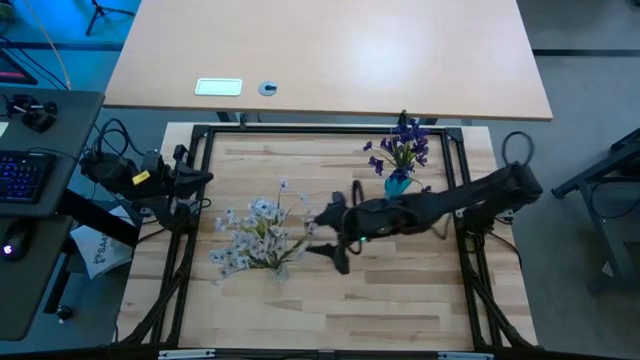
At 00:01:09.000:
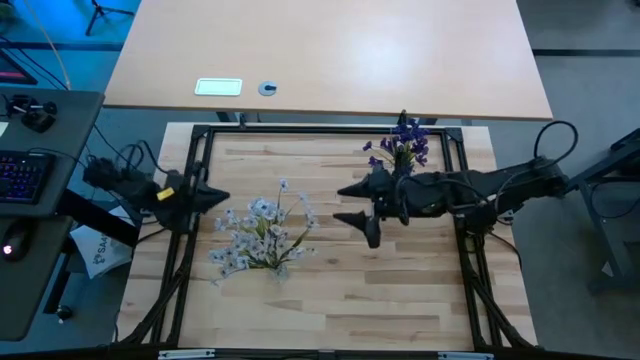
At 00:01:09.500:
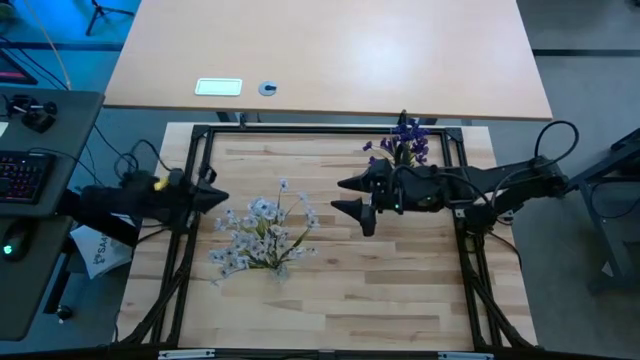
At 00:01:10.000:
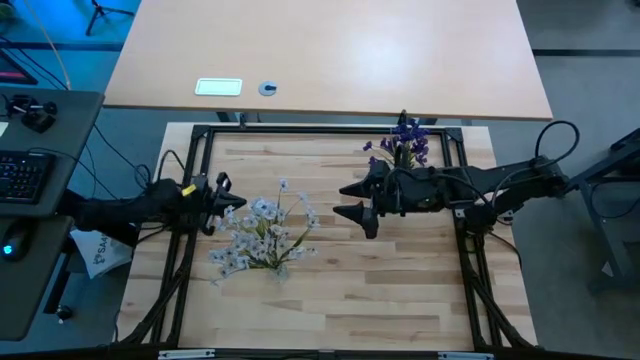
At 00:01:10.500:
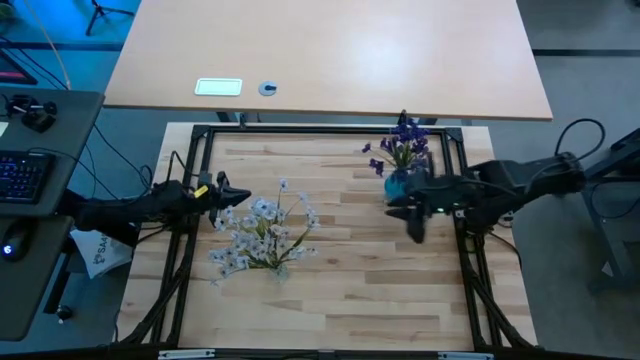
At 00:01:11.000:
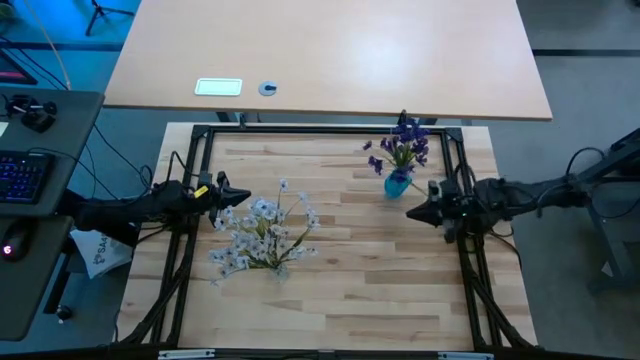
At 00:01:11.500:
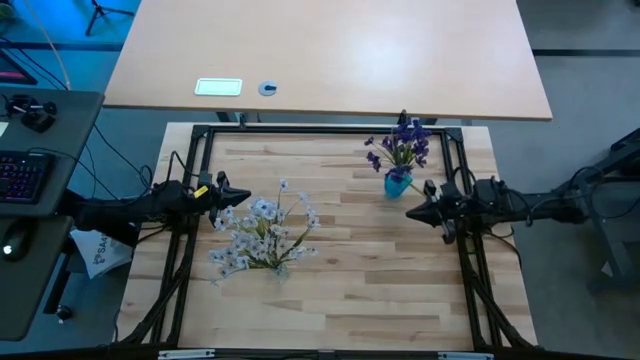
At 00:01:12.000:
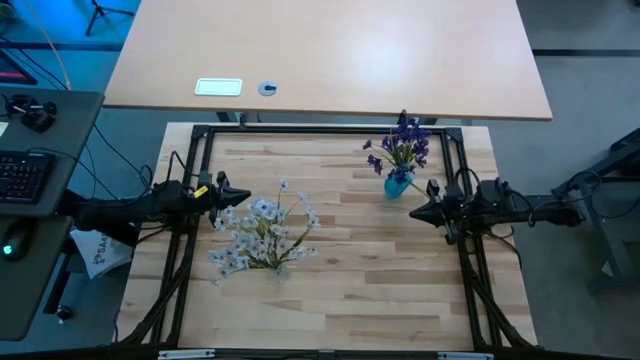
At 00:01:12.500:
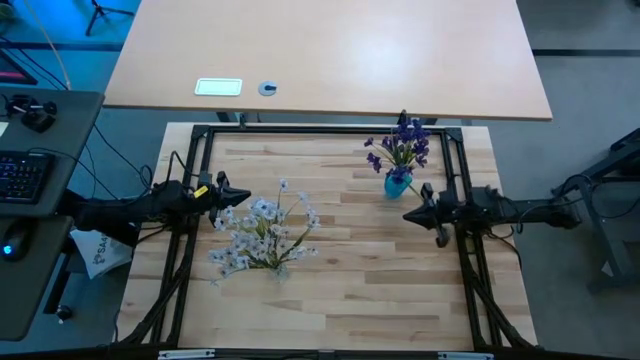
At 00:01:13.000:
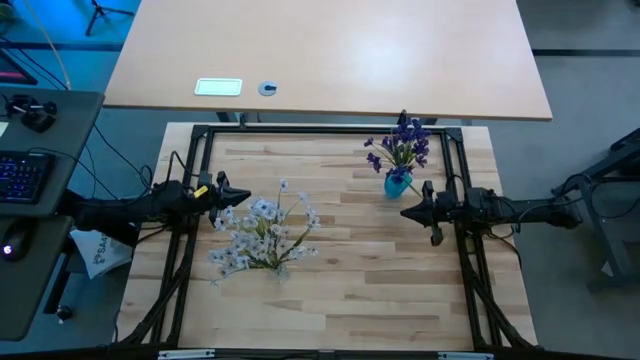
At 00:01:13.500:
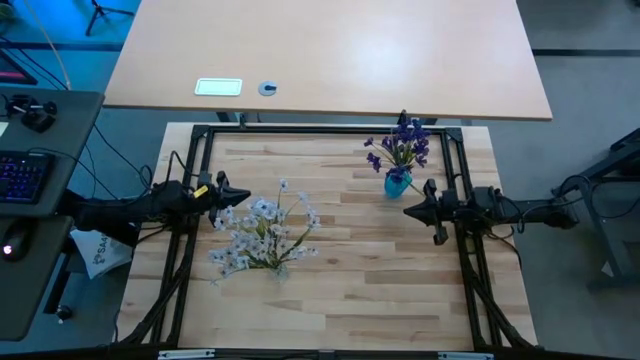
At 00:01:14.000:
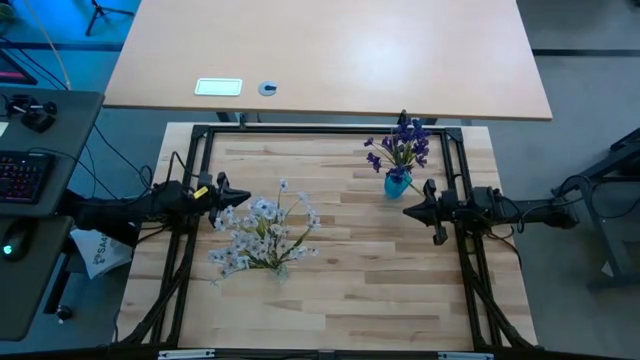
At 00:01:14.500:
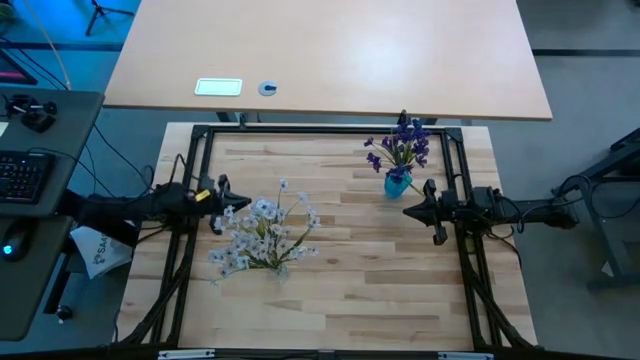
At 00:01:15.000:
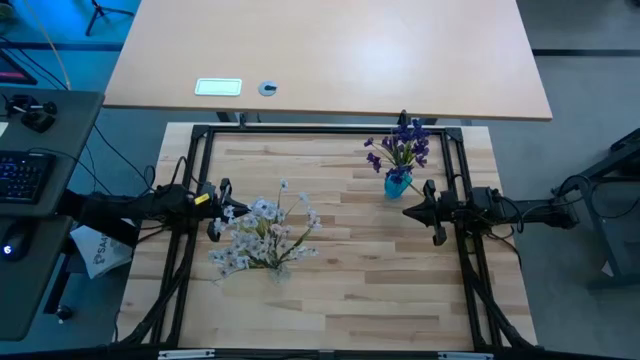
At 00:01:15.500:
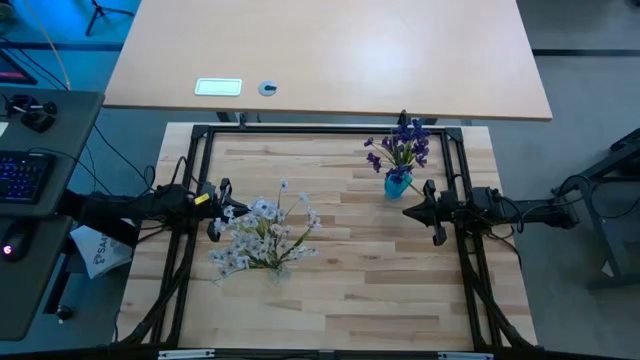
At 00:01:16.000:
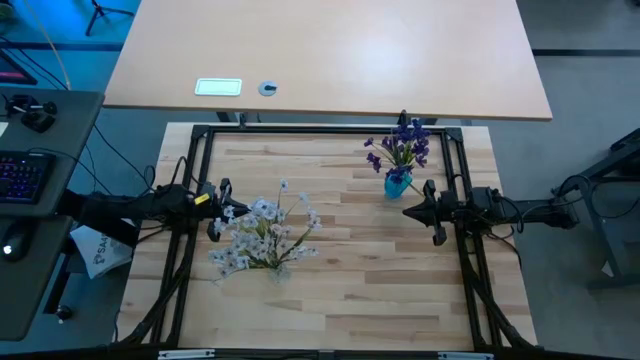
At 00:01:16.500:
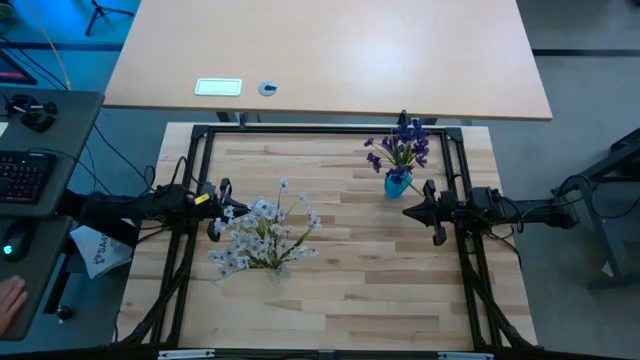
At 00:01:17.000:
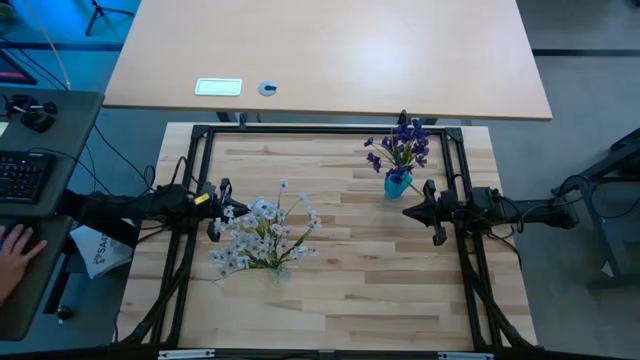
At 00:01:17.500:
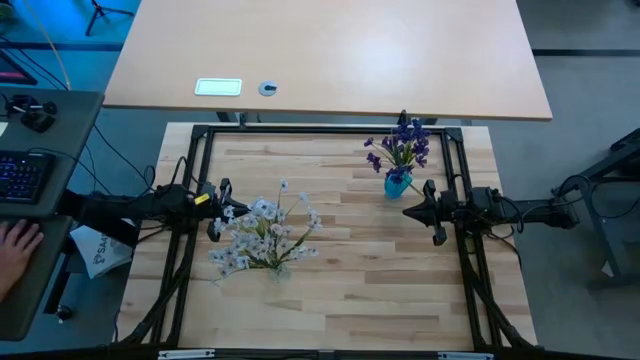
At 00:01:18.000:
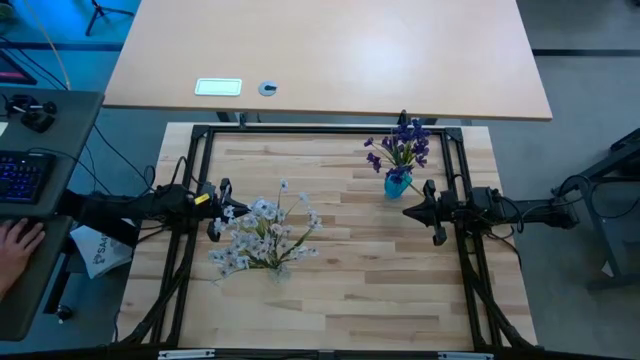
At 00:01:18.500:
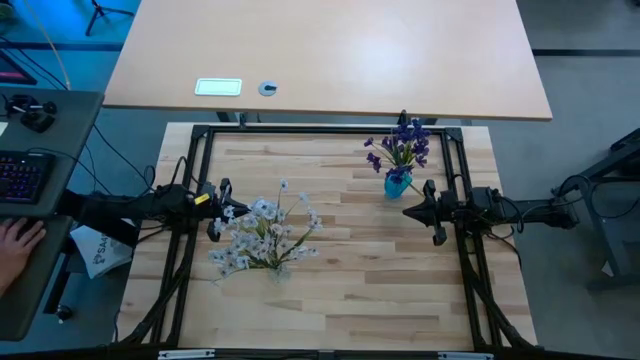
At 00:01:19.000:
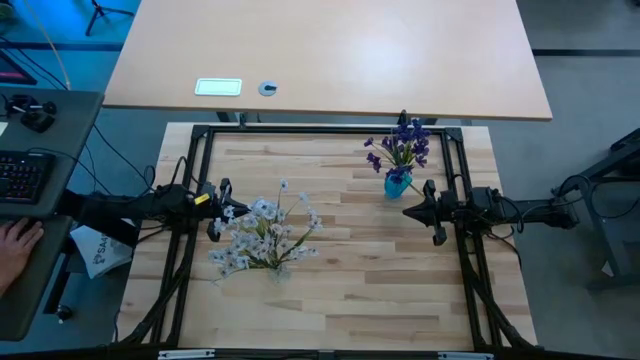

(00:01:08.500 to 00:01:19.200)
Task: Sort flowers into vase by color
Return to Home Position

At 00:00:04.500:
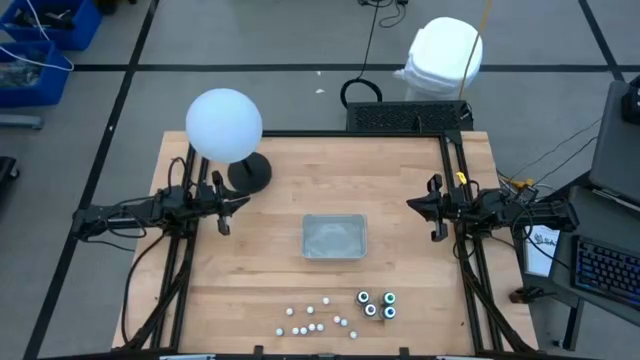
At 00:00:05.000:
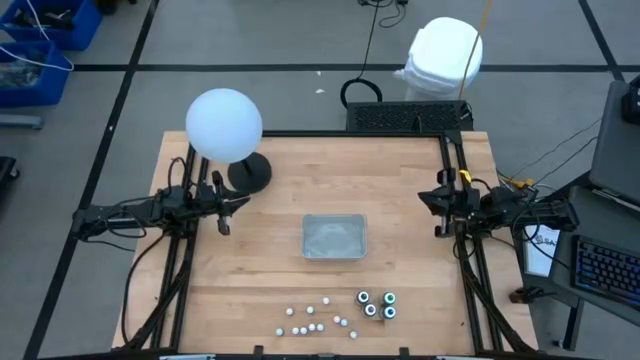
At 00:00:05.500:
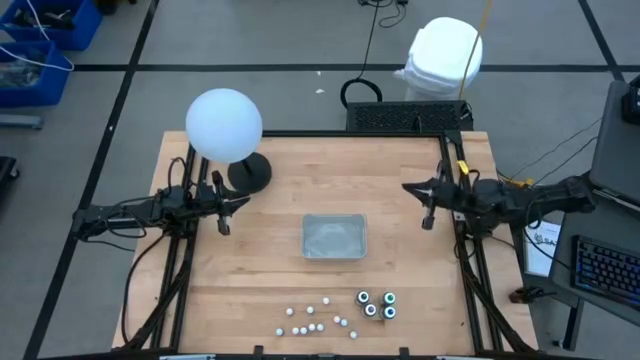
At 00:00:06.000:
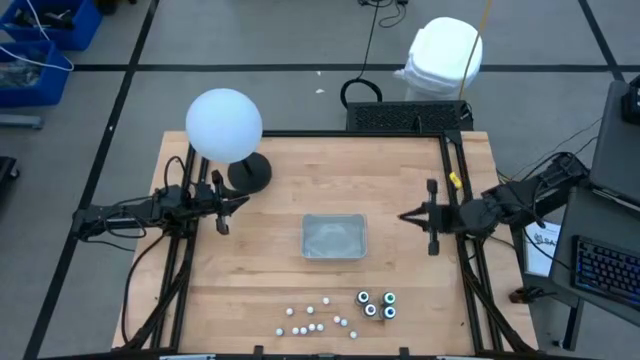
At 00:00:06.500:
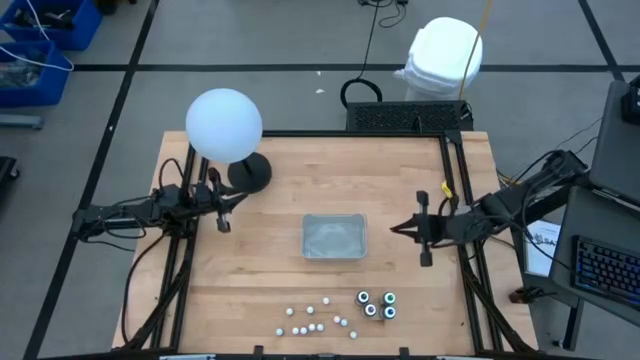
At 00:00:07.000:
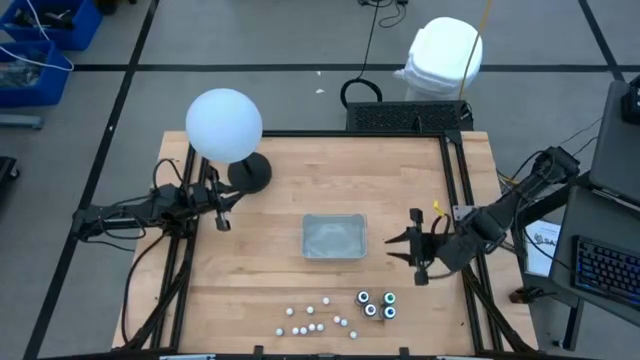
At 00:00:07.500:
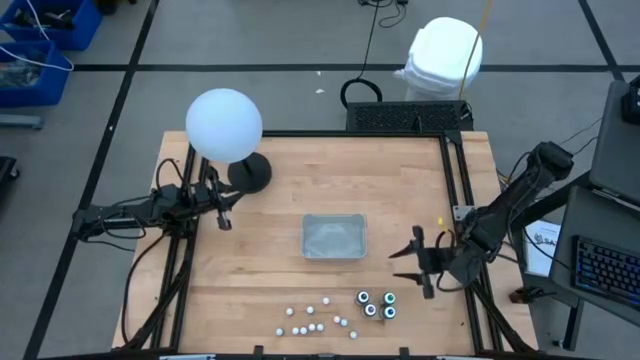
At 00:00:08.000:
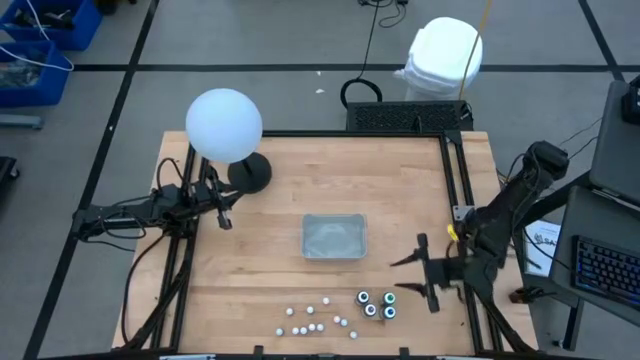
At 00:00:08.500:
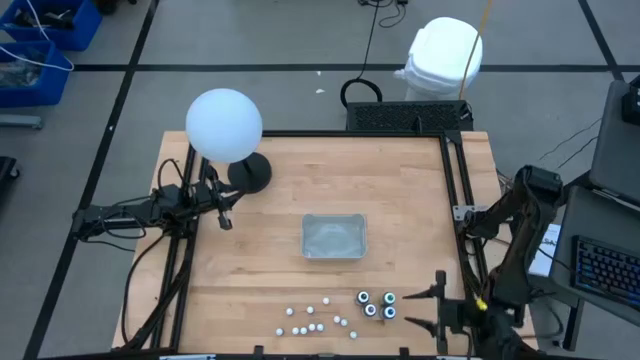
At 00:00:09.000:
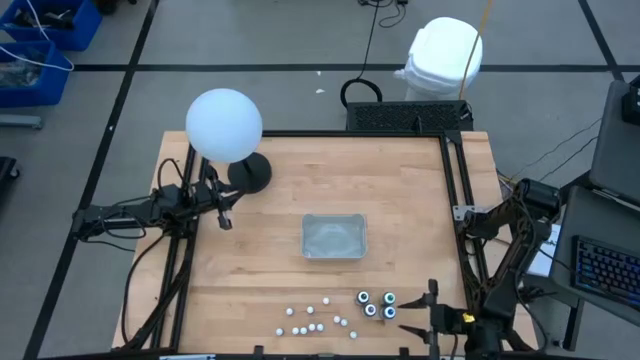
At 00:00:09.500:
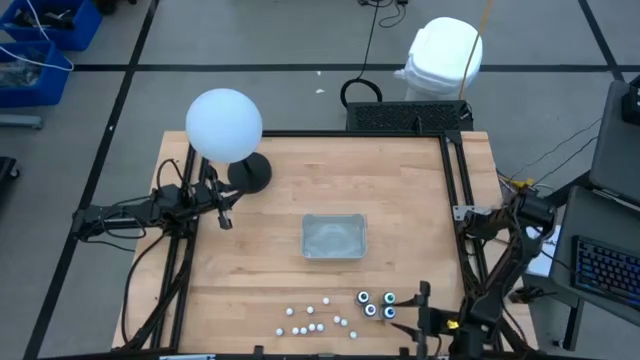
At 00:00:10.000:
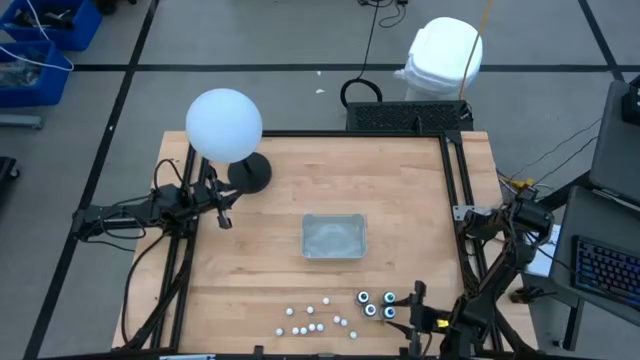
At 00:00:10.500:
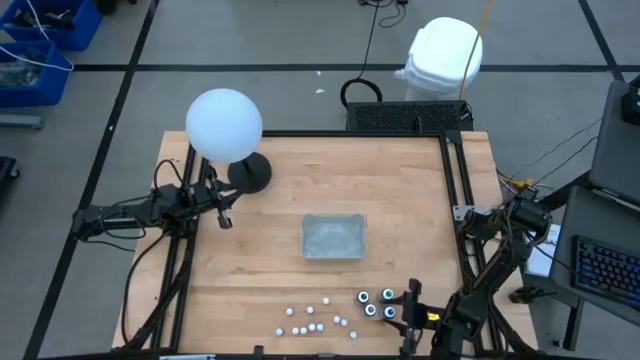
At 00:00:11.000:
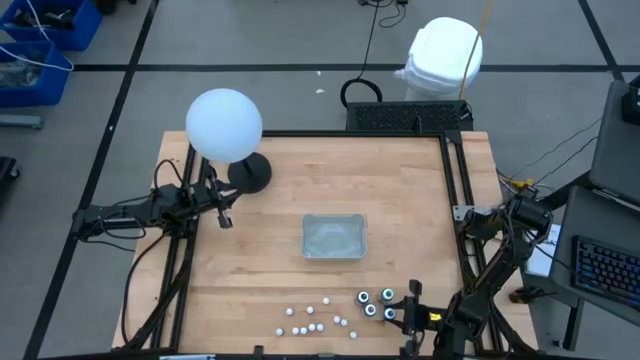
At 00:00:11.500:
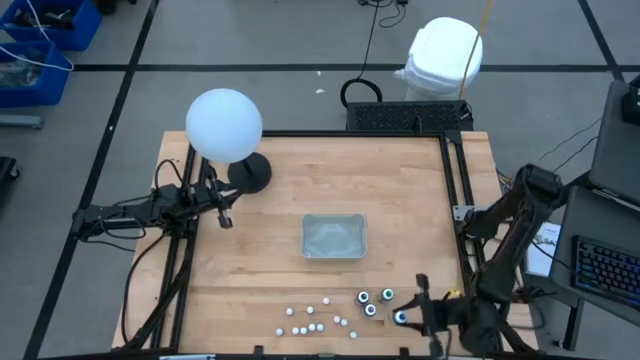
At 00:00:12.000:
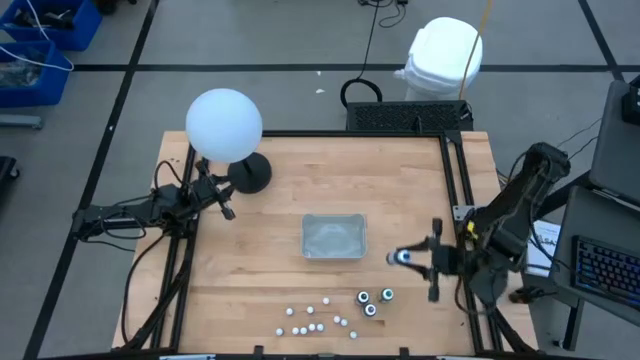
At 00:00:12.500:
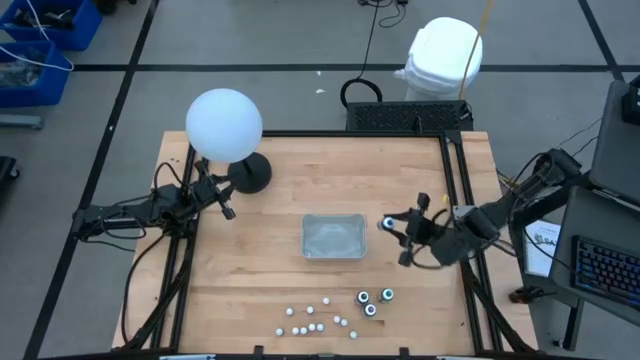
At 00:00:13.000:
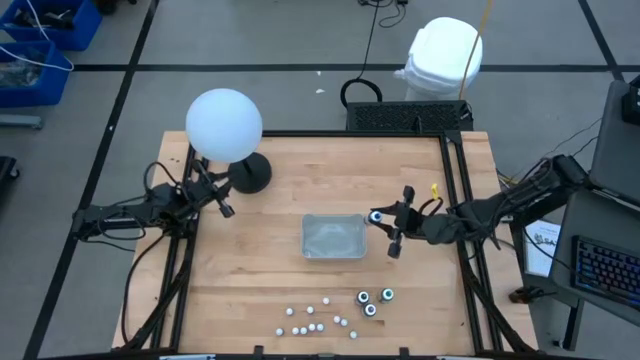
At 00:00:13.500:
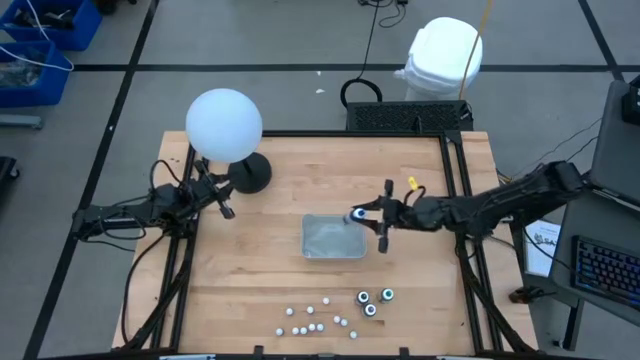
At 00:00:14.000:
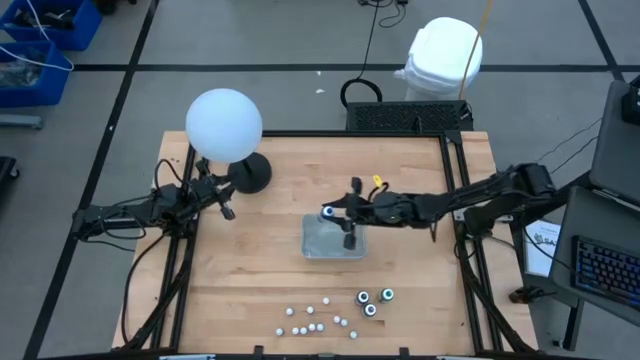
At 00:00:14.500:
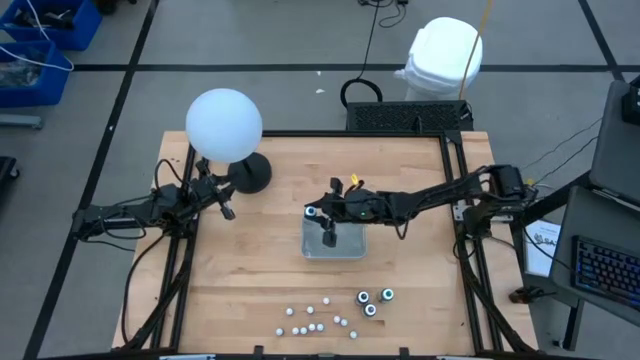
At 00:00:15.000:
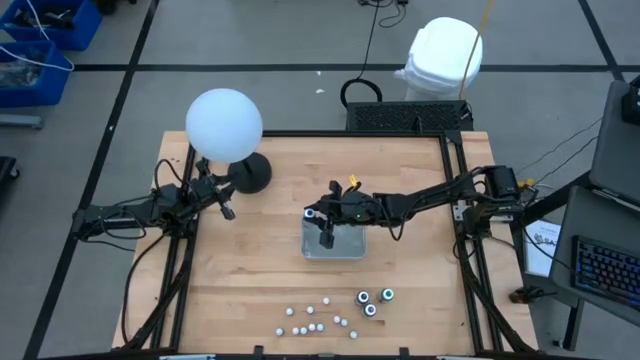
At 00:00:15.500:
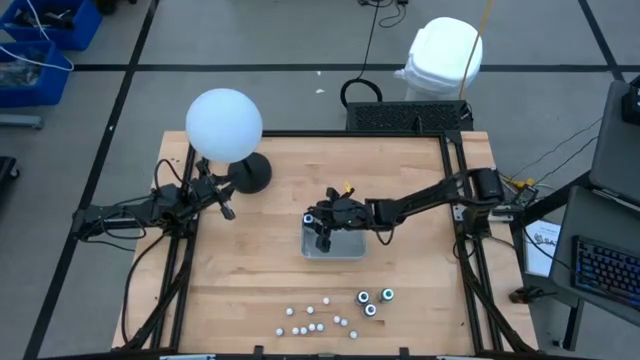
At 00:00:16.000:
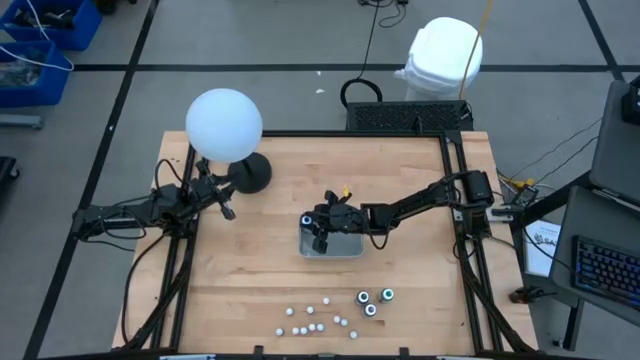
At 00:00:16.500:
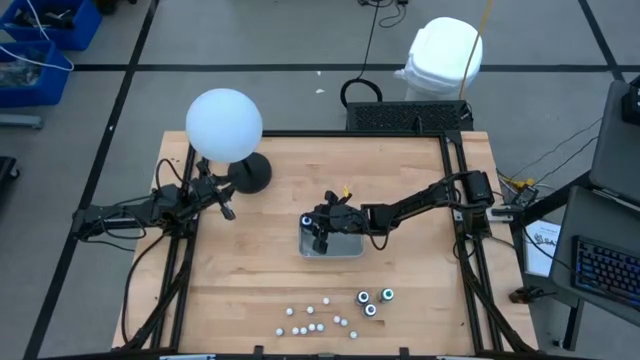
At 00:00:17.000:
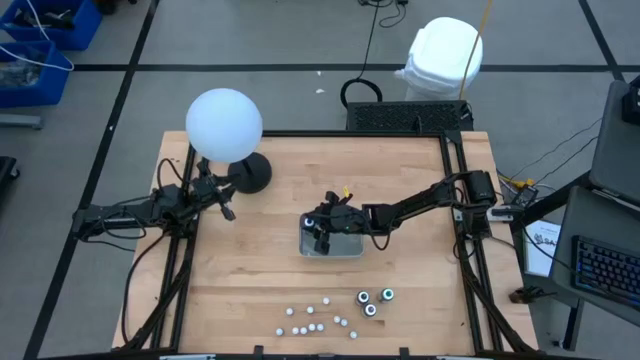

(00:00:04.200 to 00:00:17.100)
Task: Pick & Place food coloring
Put the large blue food coloring bottle into the gray bin
